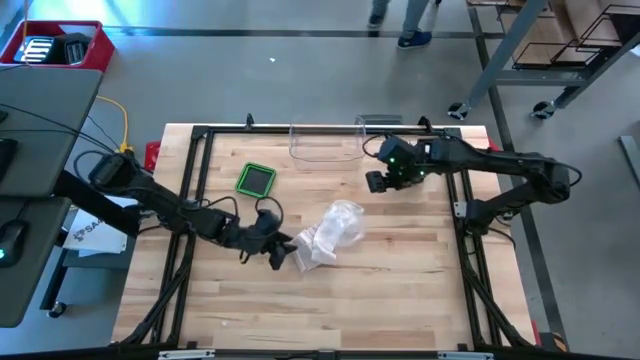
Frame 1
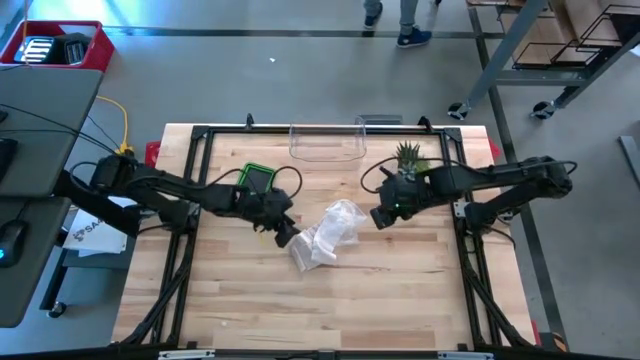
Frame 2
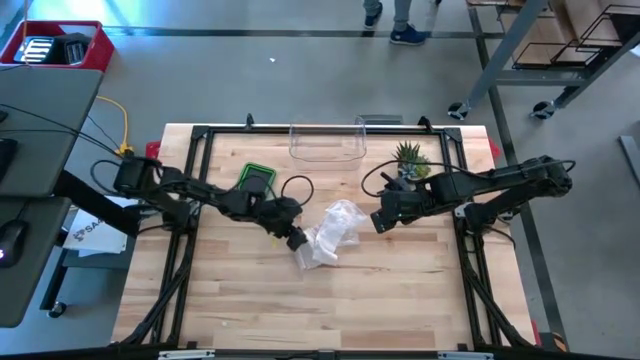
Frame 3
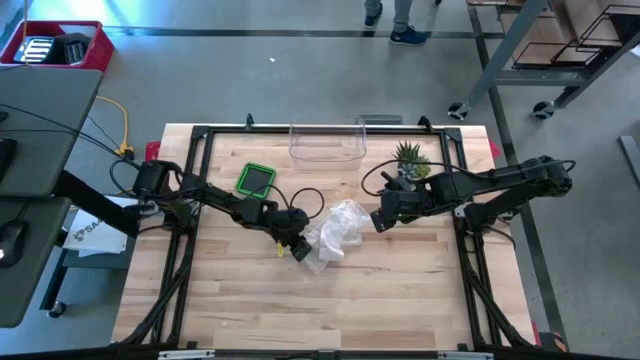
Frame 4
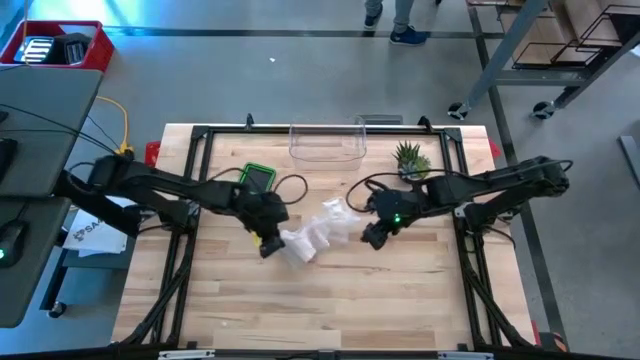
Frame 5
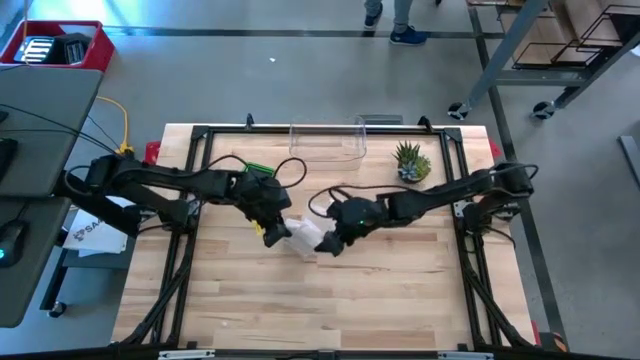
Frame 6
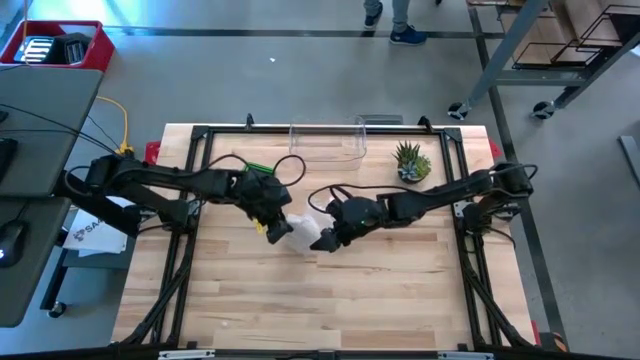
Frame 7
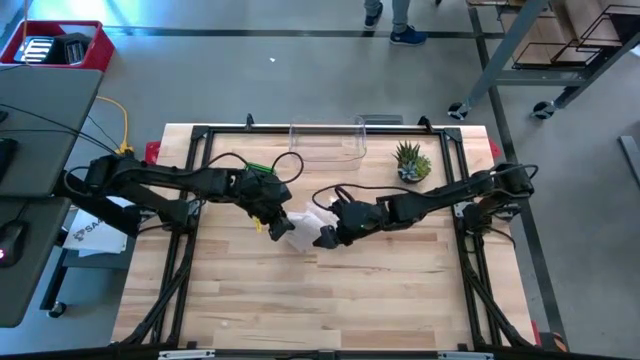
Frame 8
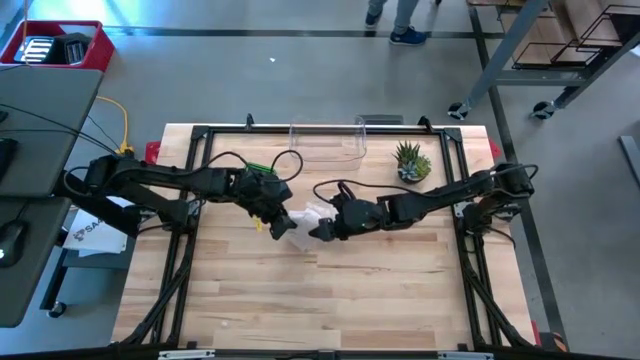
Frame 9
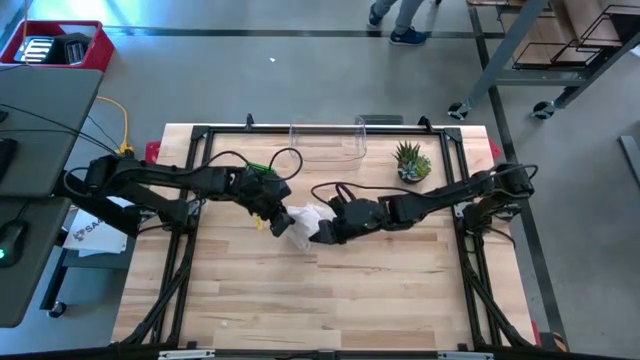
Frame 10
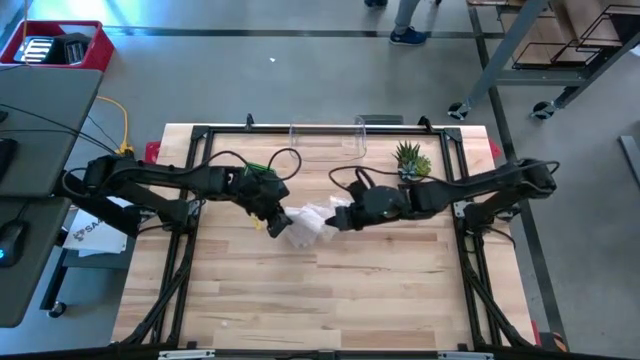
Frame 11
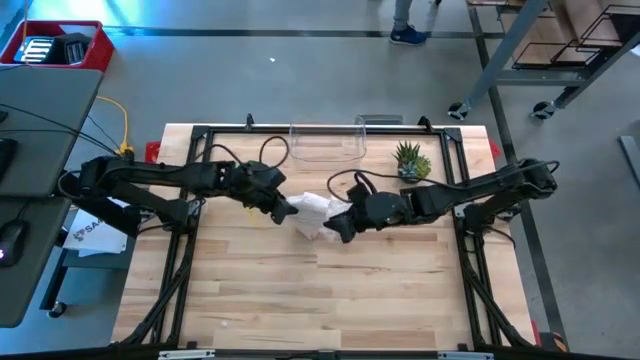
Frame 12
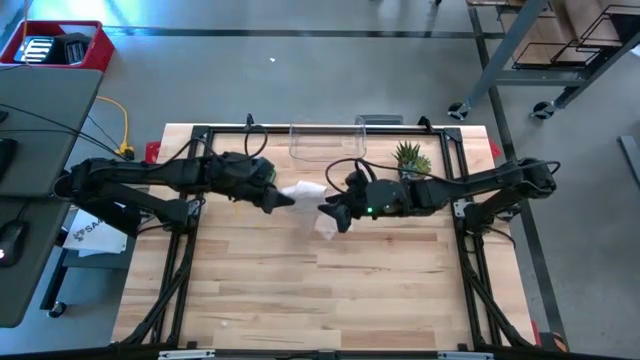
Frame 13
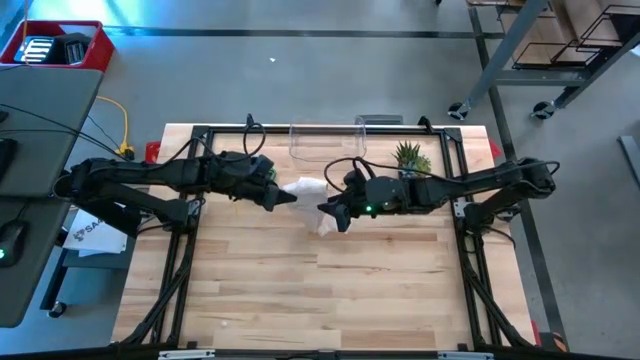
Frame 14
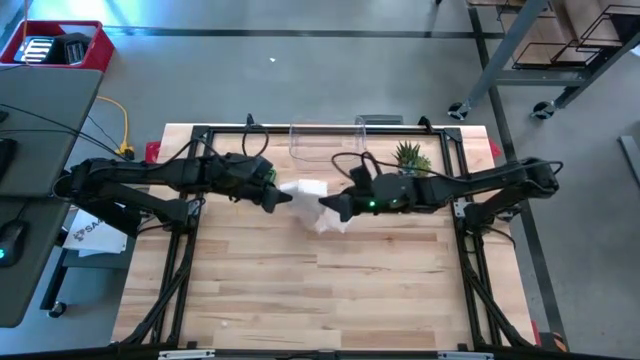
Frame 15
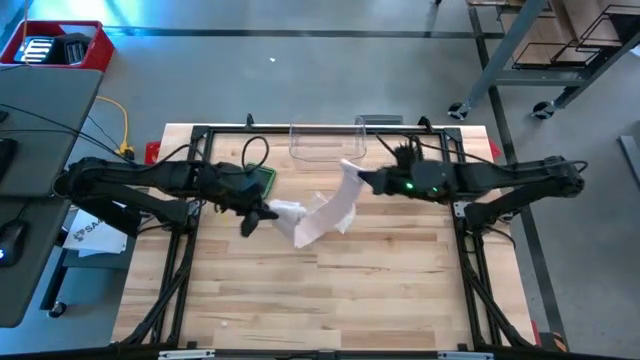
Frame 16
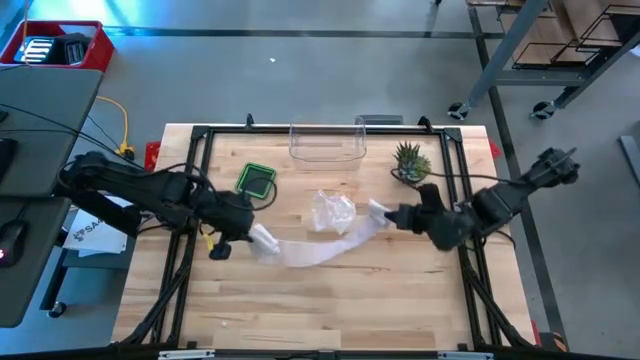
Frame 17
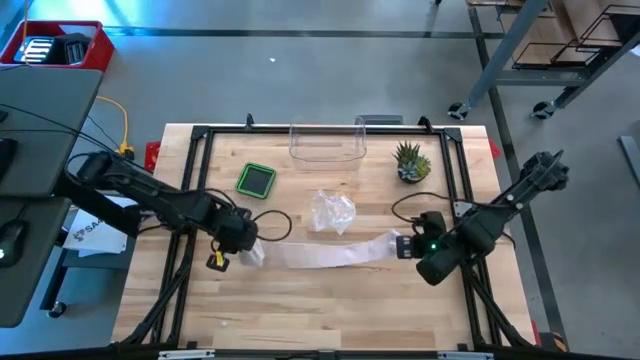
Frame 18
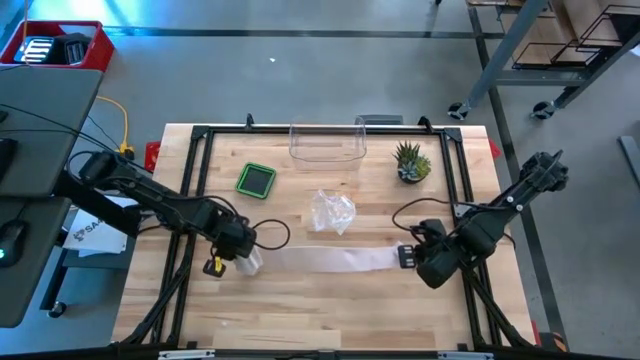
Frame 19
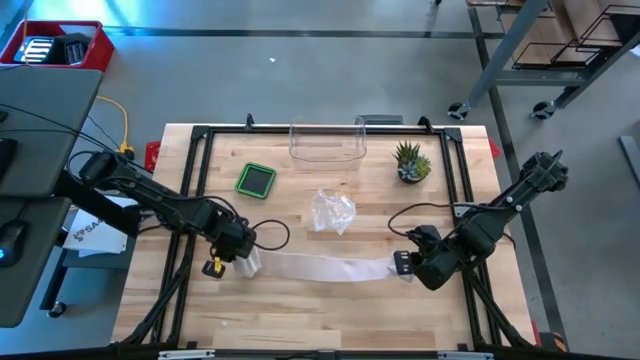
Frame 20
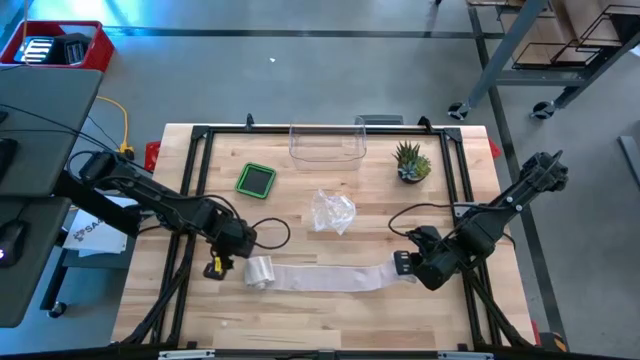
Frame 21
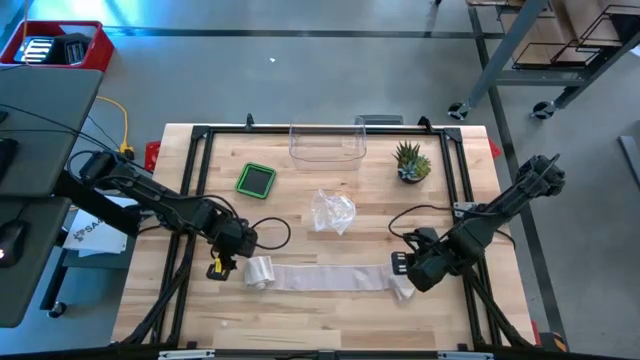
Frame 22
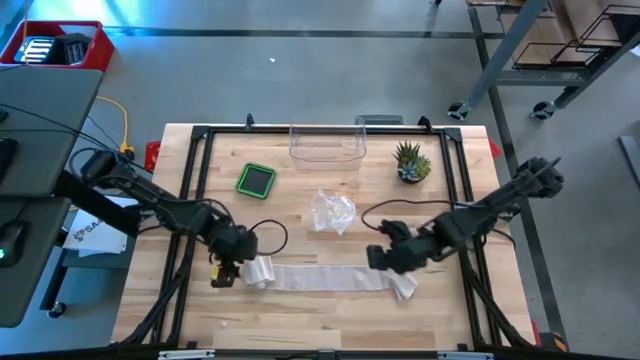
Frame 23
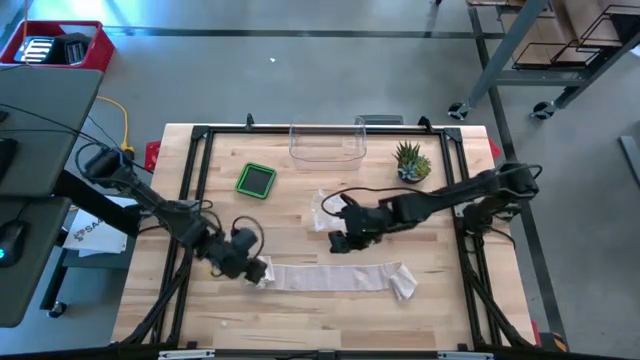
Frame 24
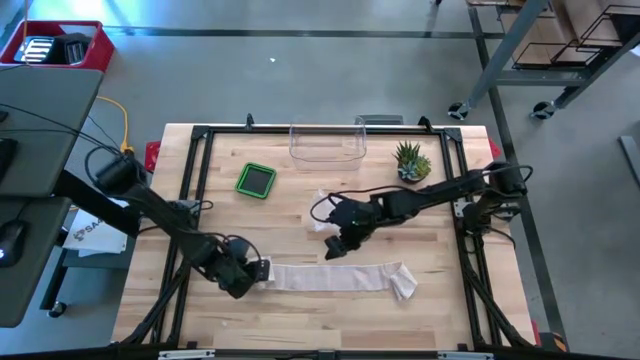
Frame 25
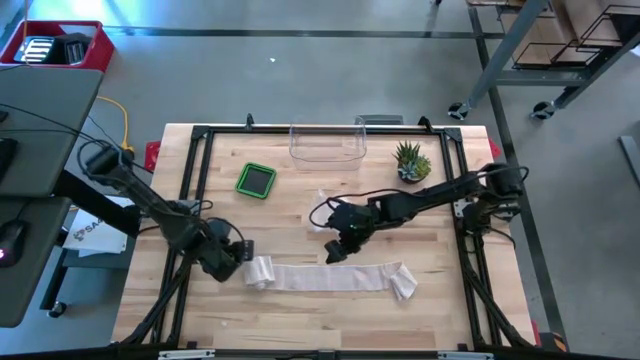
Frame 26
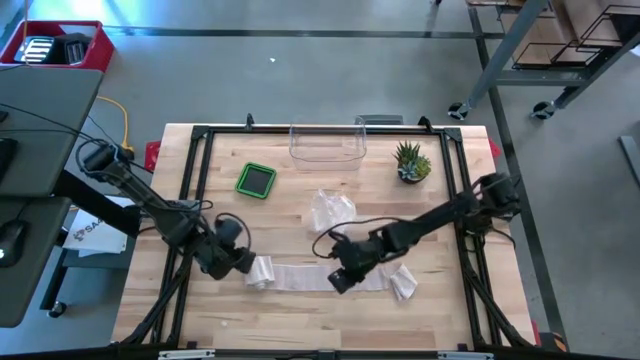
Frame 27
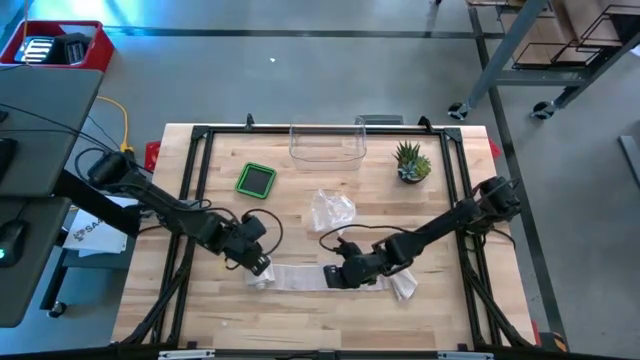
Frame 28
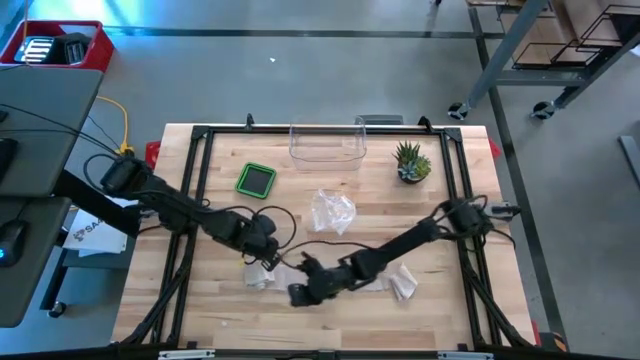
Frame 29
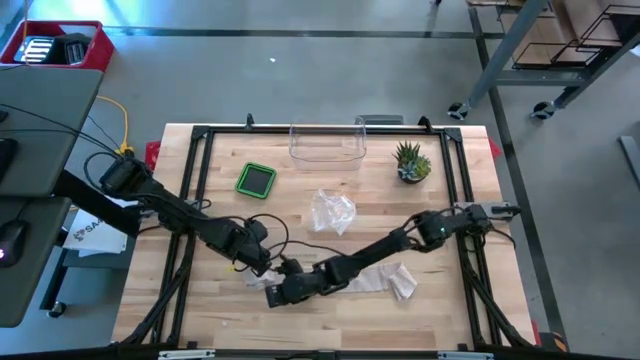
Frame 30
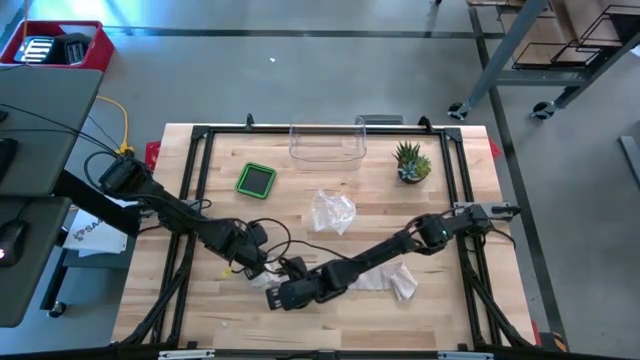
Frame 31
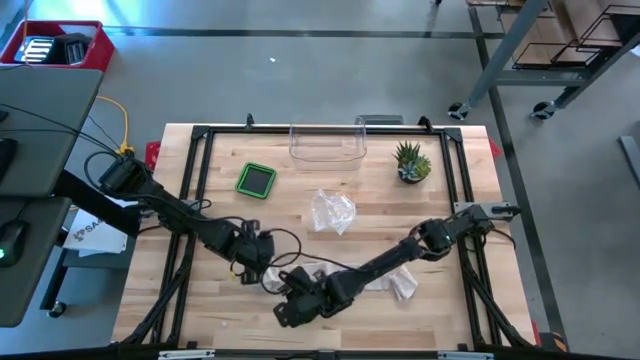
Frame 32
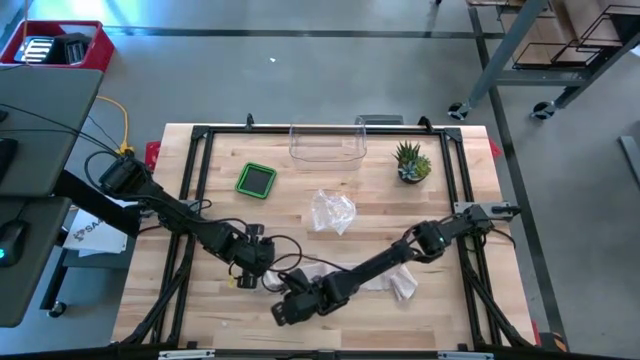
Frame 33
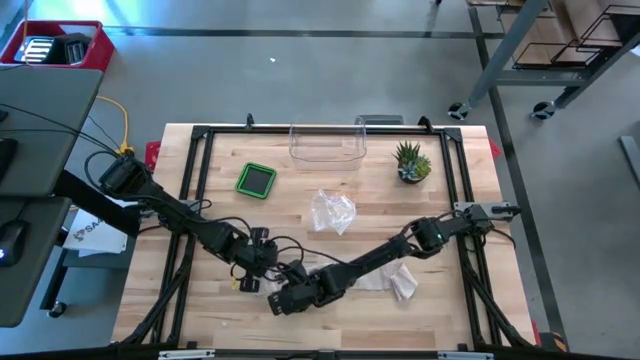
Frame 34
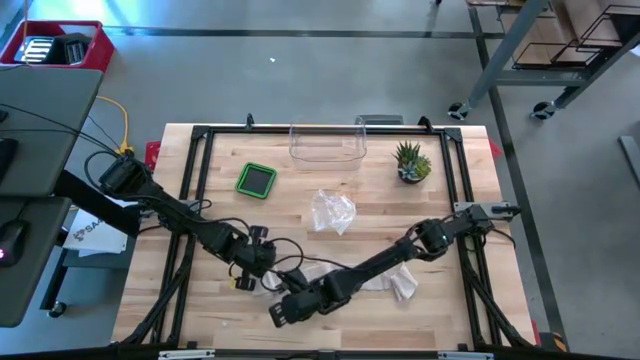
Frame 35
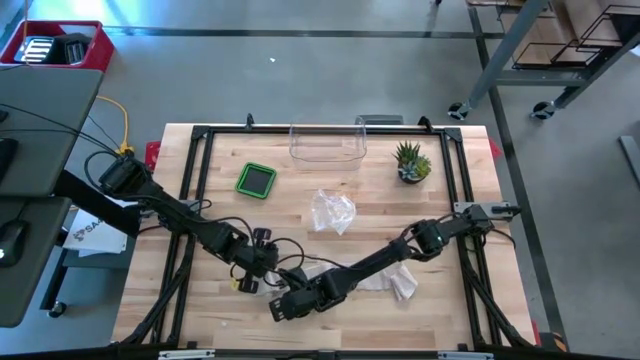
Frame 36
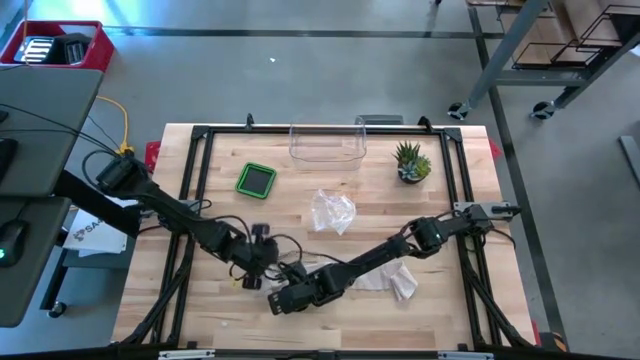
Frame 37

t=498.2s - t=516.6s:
Task: Roll bandage
Roll the bandage

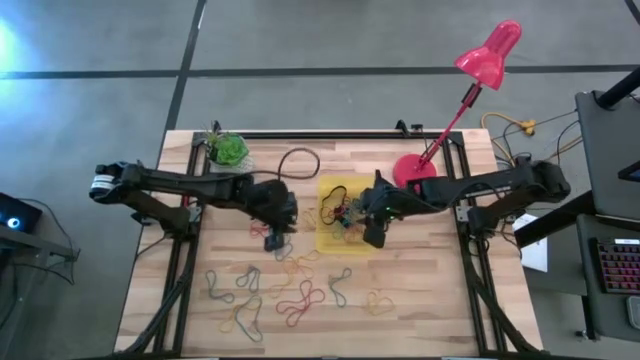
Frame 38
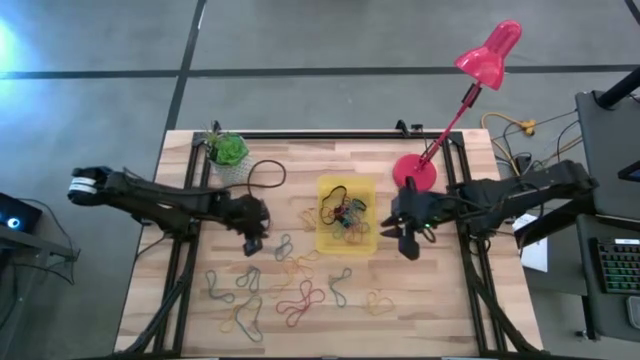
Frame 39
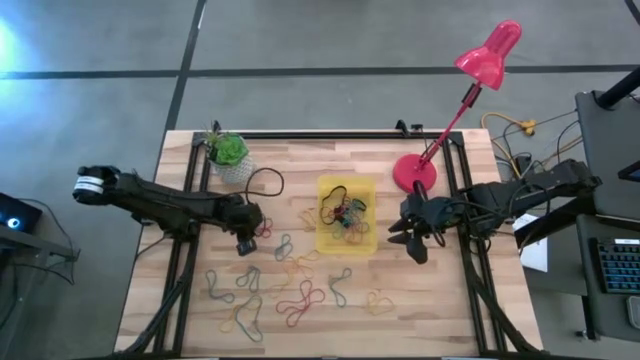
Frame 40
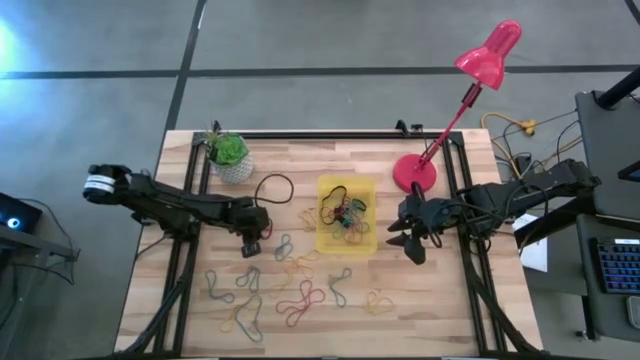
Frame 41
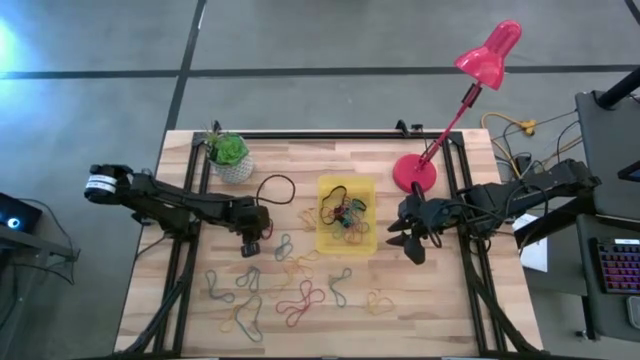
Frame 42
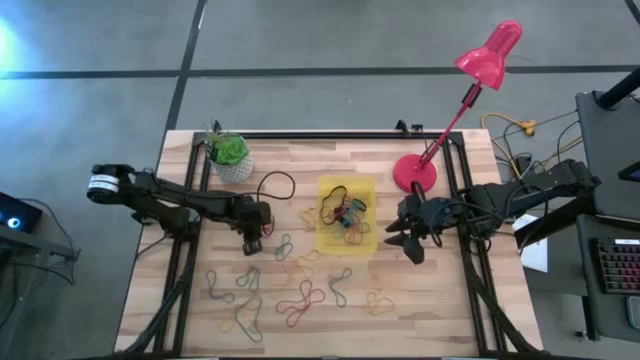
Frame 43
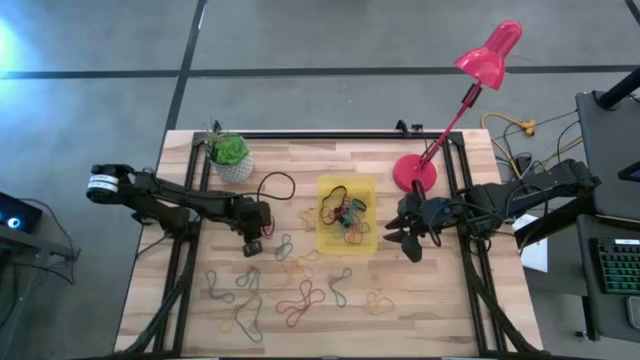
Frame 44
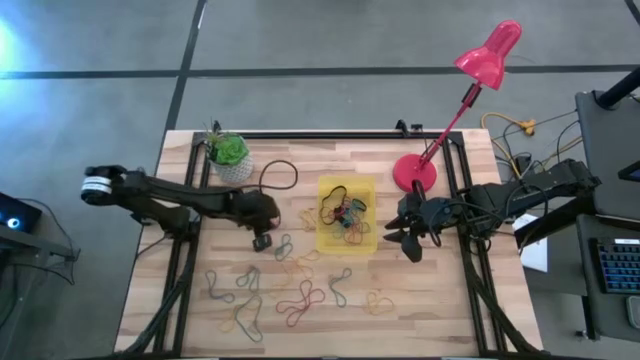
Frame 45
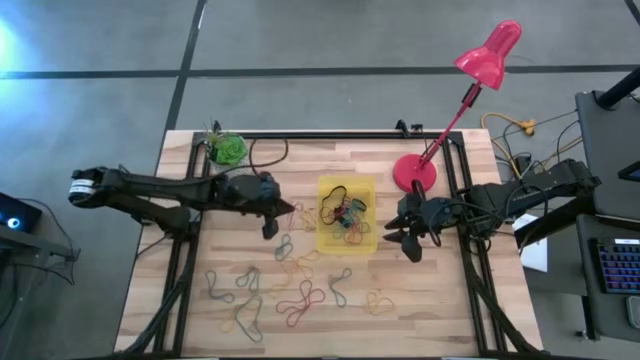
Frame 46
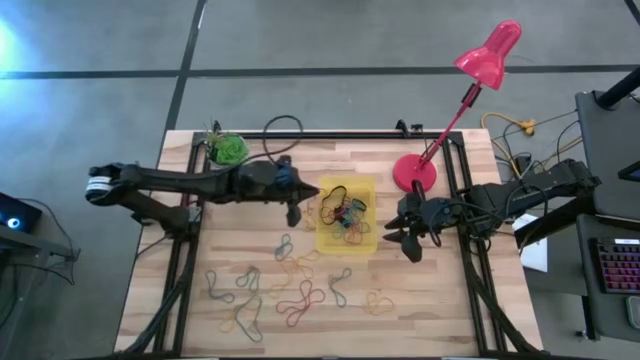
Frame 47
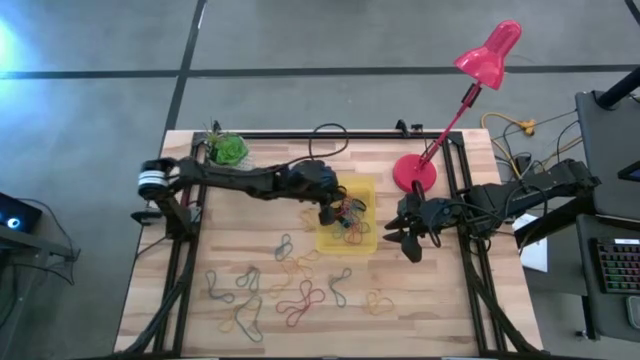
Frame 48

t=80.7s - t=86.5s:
Task: Pick and place rubber bands into bin
Put the left red rubber band into the bin
